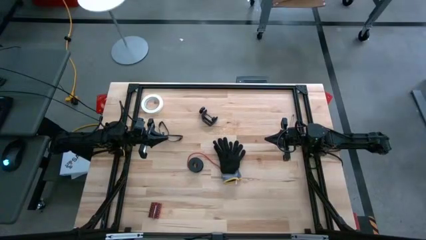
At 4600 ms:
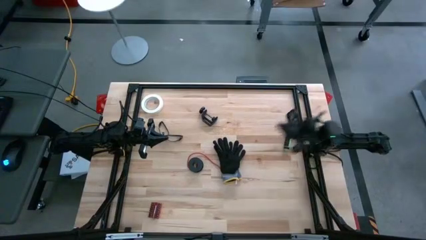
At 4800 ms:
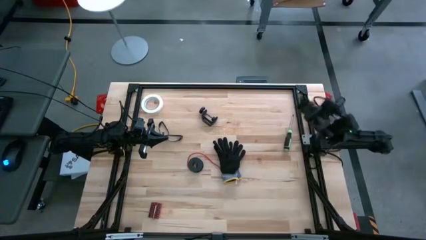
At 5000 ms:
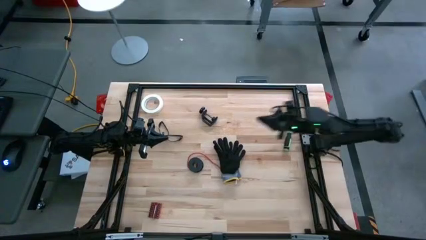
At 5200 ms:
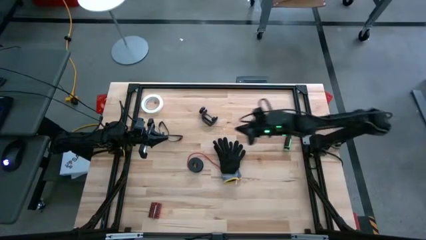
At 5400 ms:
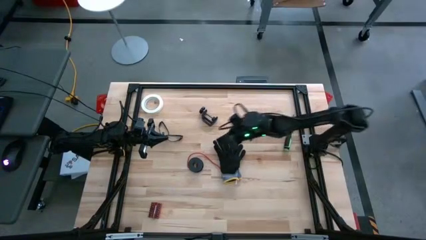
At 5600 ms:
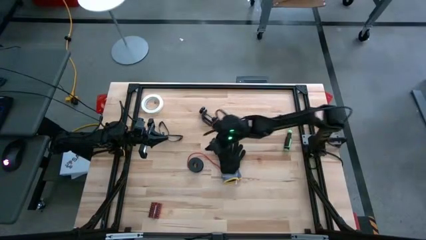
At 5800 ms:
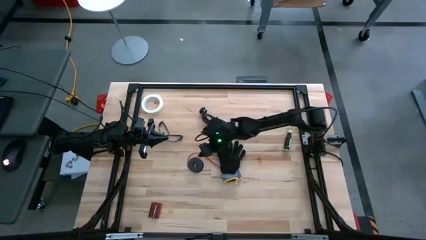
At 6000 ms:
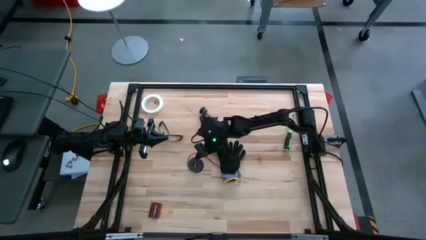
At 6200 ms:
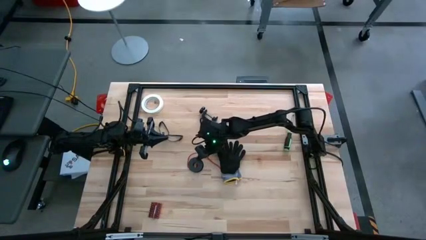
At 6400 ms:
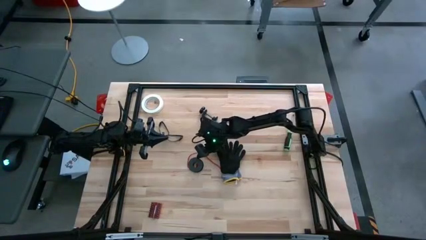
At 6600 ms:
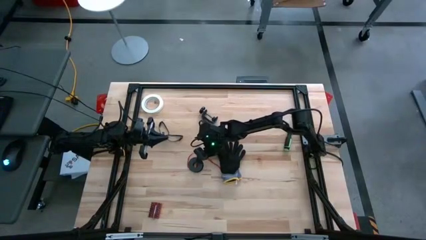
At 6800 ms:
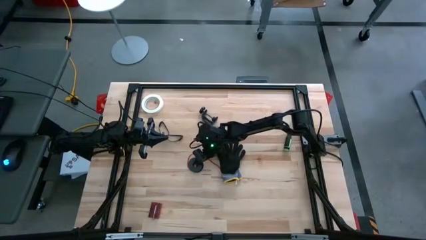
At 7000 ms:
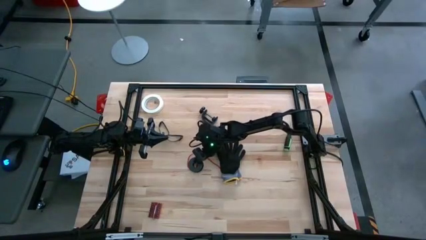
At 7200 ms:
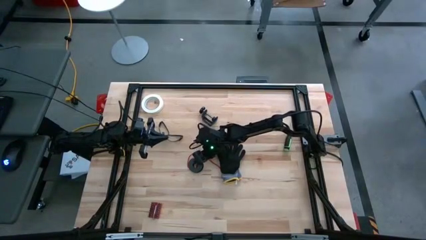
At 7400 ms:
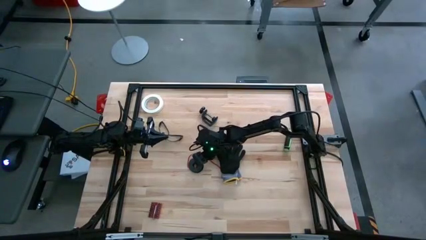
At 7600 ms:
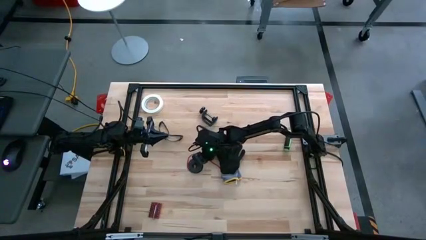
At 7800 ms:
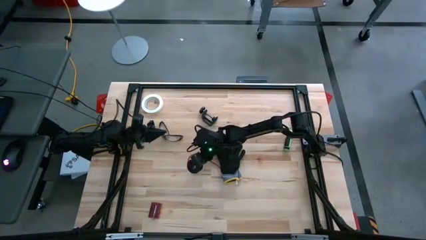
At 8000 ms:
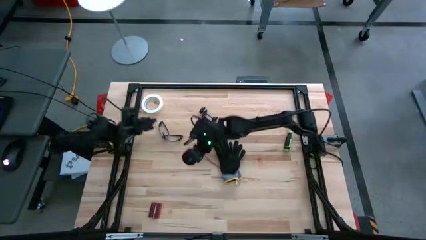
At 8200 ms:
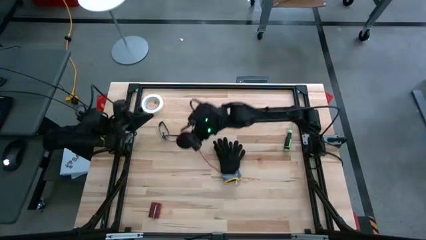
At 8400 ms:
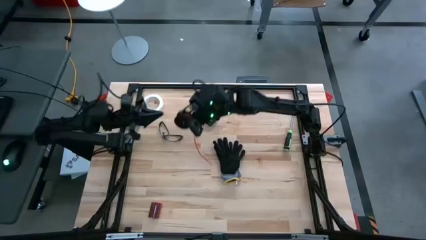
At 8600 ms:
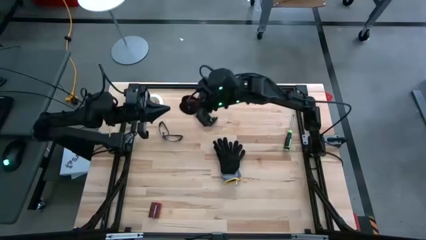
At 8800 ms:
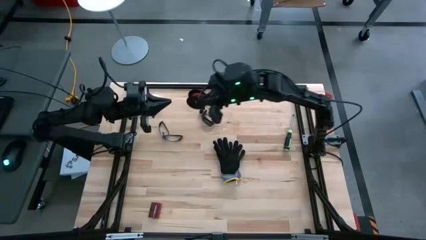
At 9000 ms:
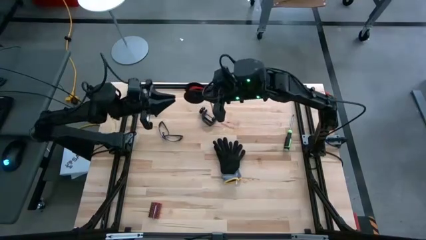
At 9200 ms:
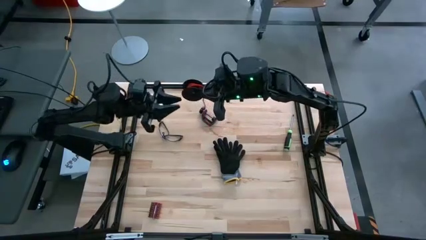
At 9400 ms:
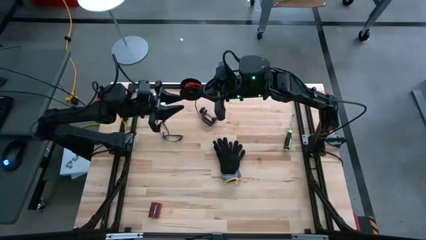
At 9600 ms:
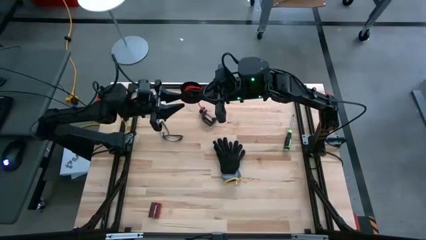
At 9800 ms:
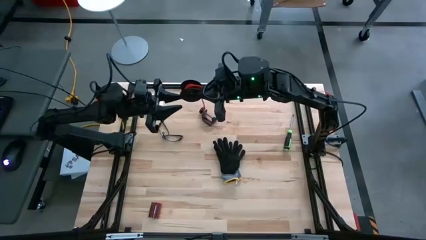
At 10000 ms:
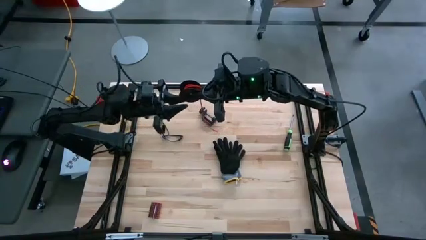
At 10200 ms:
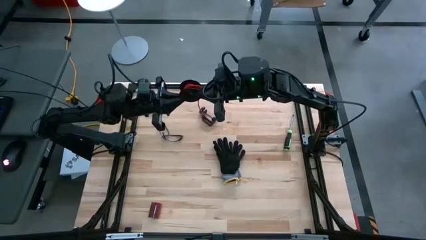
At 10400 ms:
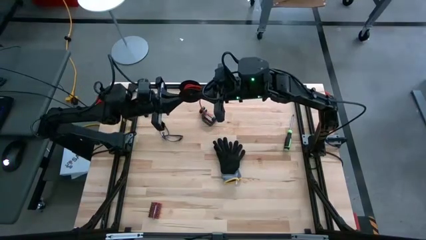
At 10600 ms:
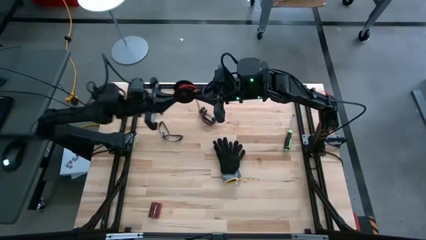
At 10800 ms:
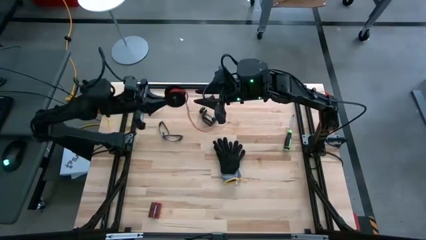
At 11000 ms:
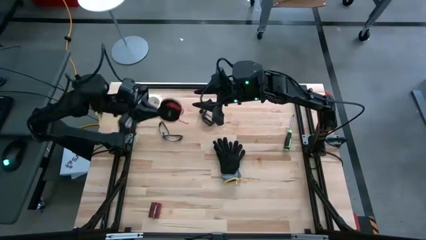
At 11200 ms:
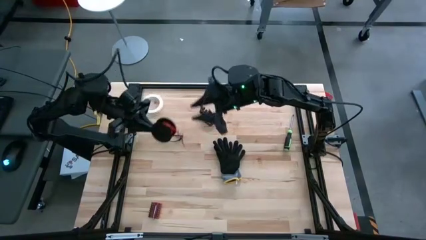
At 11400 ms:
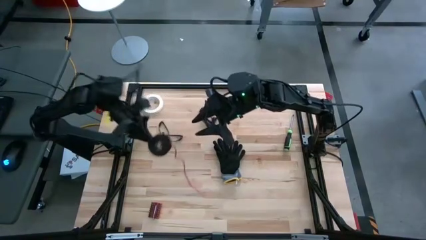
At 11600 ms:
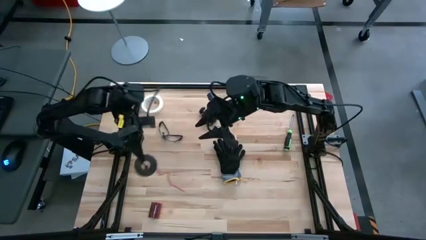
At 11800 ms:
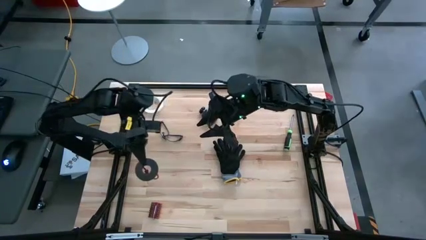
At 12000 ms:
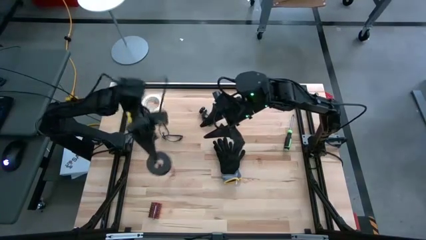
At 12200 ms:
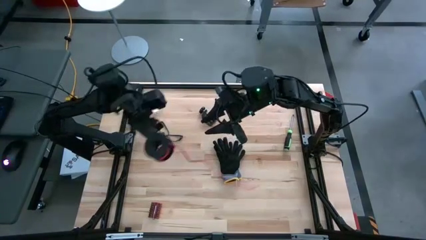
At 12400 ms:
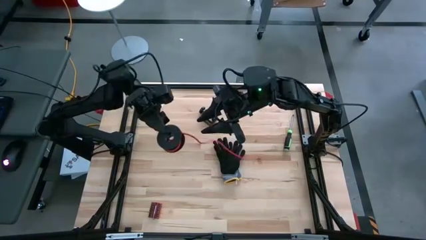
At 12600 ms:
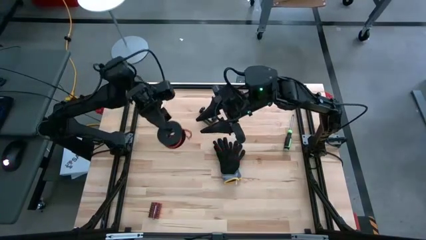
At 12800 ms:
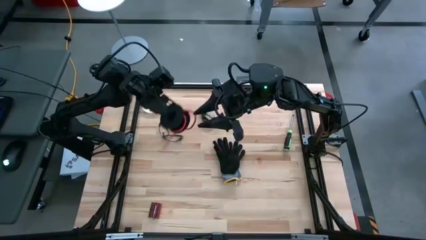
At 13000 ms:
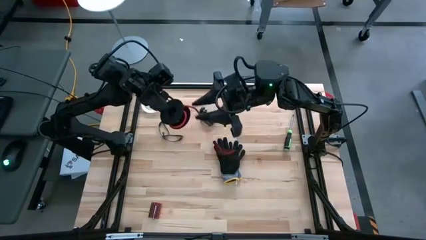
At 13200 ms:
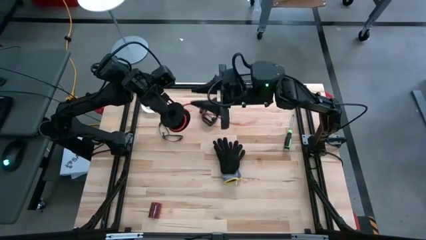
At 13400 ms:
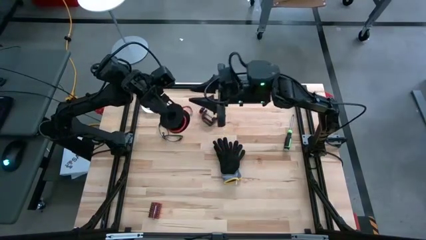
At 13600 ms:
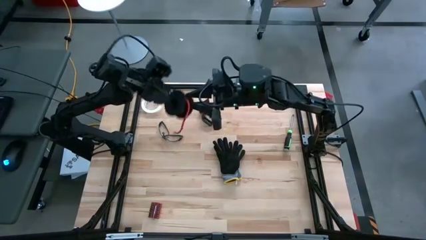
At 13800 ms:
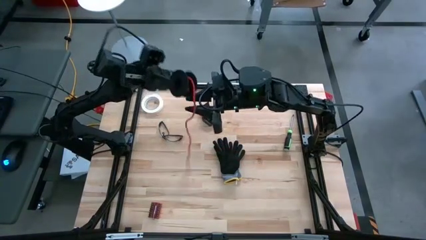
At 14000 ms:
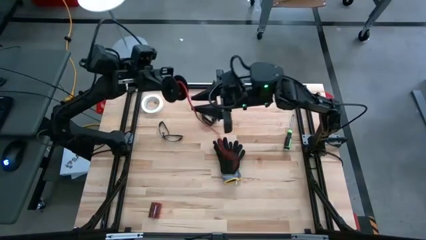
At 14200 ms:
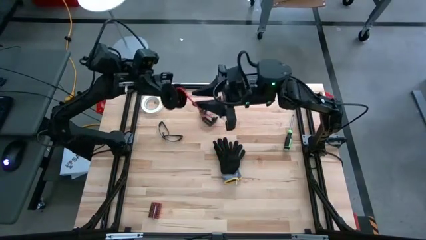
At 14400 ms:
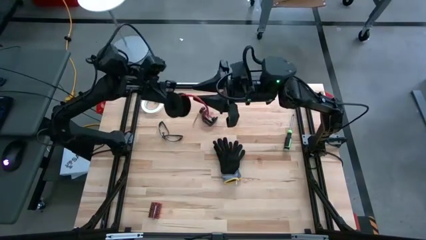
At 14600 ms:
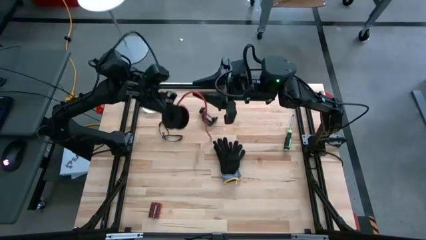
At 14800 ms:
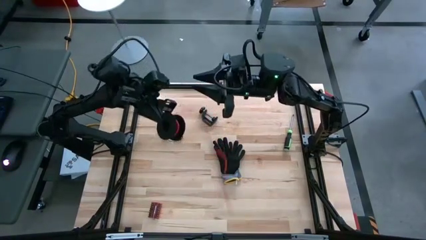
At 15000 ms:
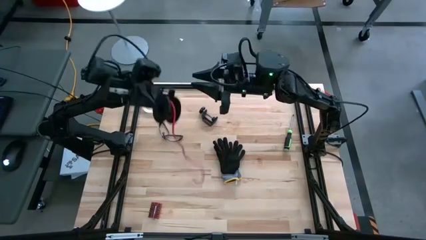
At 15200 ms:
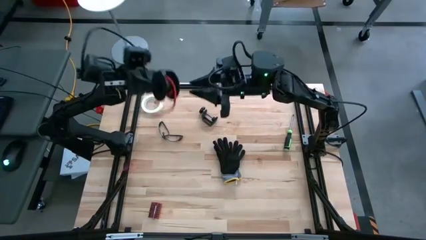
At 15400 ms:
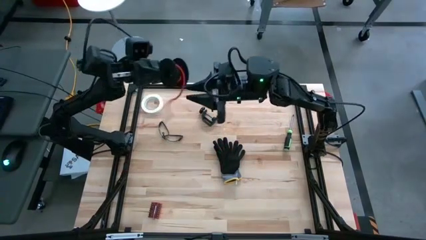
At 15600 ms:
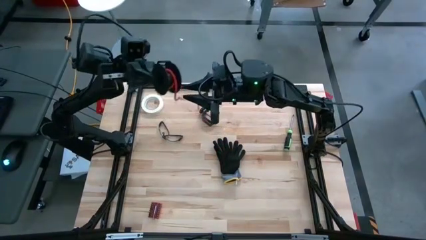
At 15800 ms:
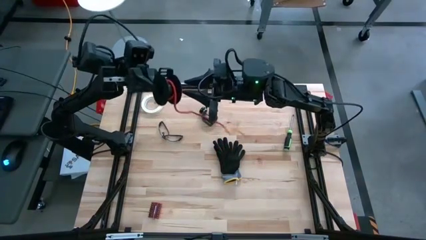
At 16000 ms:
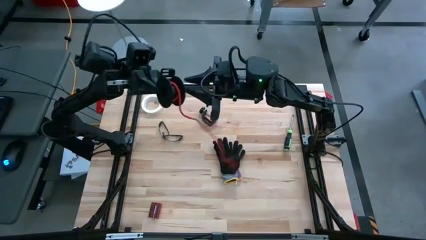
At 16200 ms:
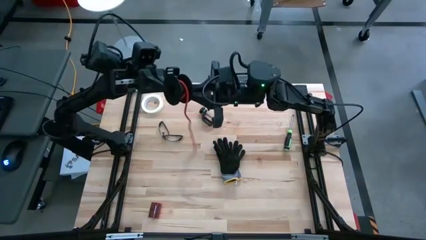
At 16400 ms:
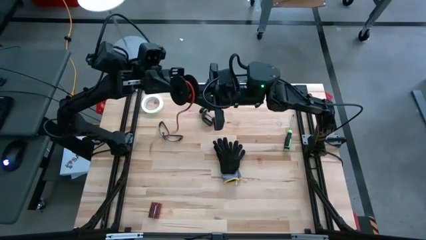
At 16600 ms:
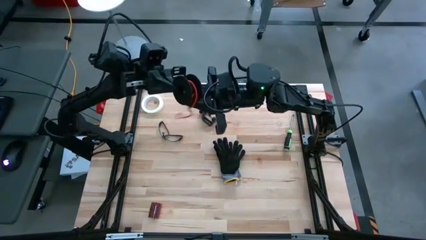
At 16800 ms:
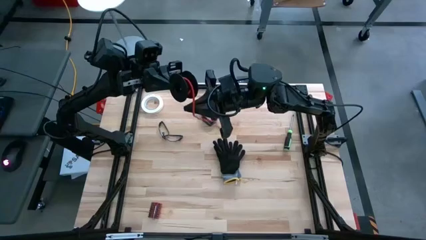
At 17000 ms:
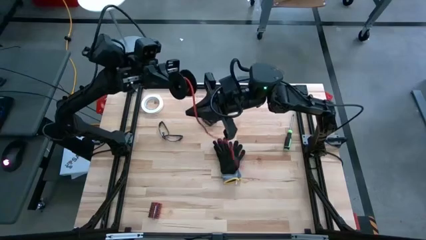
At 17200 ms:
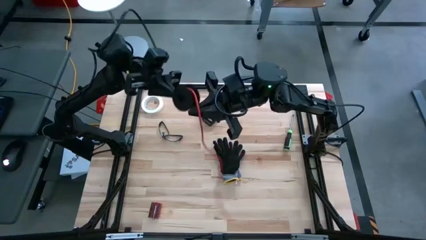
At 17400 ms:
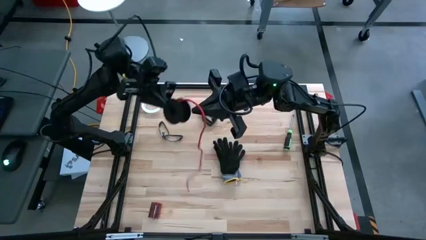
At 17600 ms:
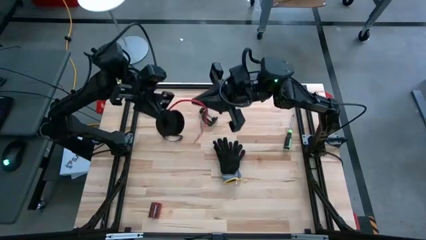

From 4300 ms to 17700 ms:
Task: Coil cords
Uncoil the orange wire from the spool
